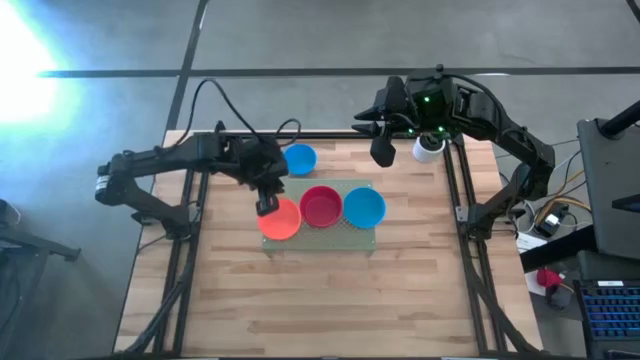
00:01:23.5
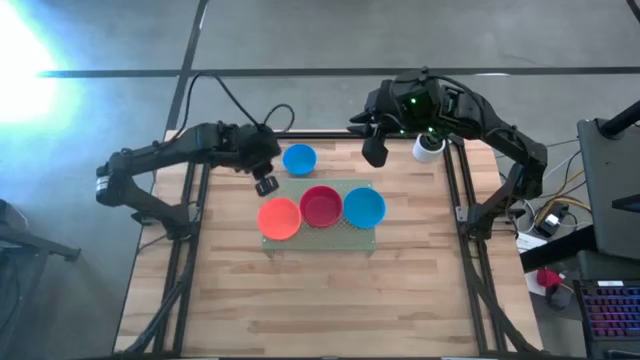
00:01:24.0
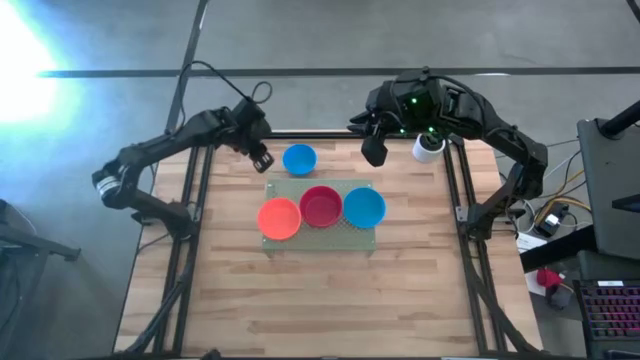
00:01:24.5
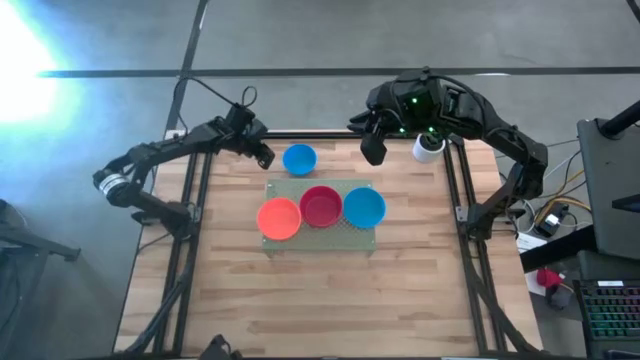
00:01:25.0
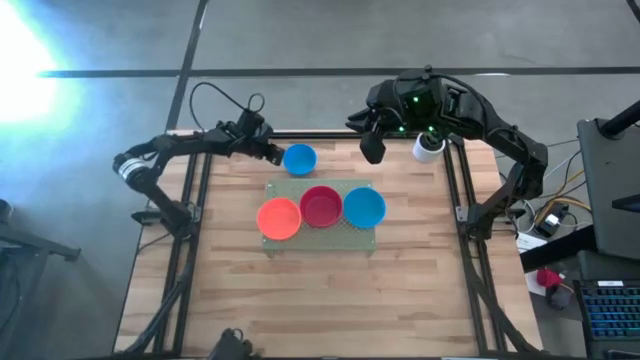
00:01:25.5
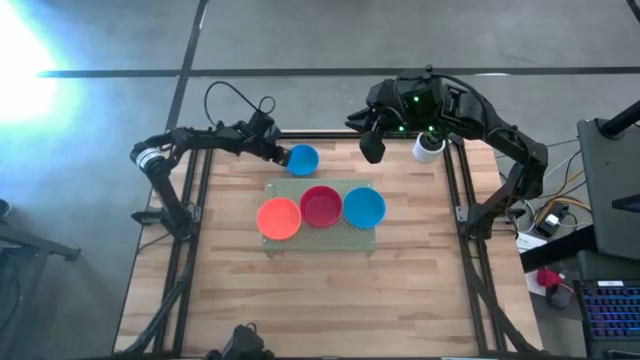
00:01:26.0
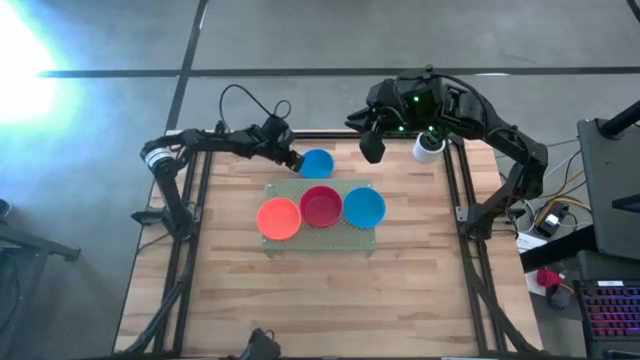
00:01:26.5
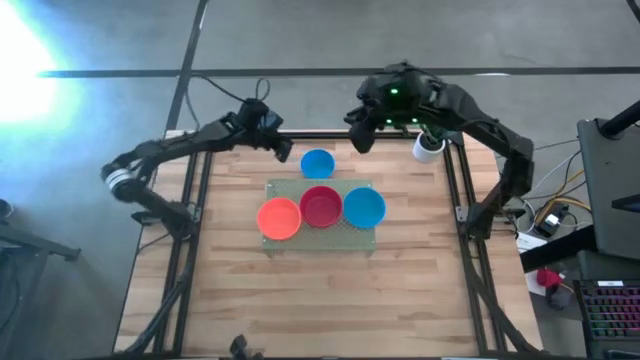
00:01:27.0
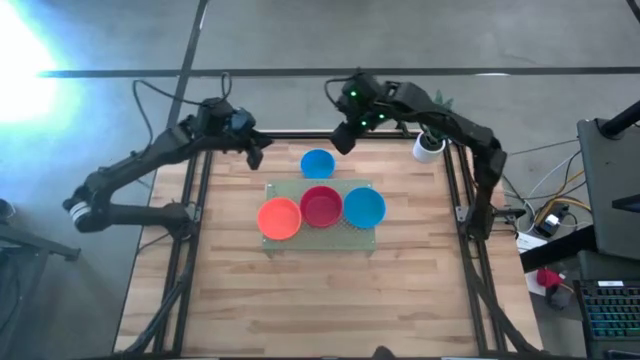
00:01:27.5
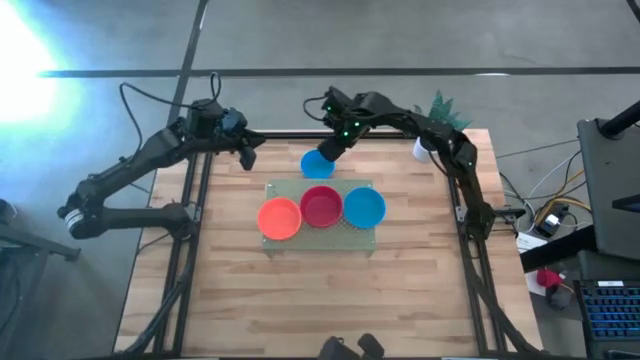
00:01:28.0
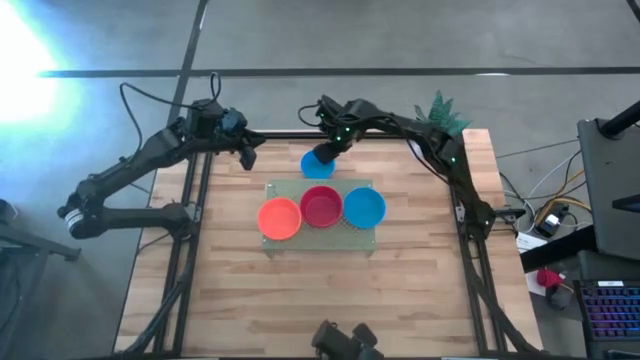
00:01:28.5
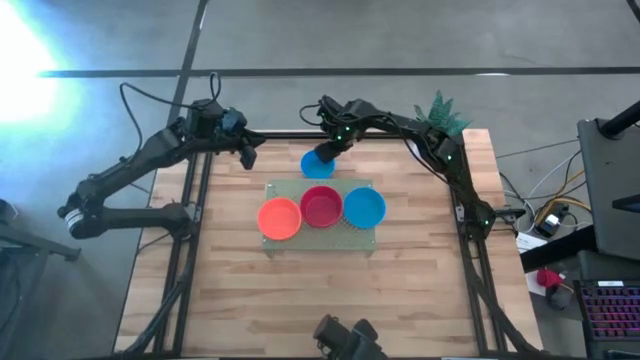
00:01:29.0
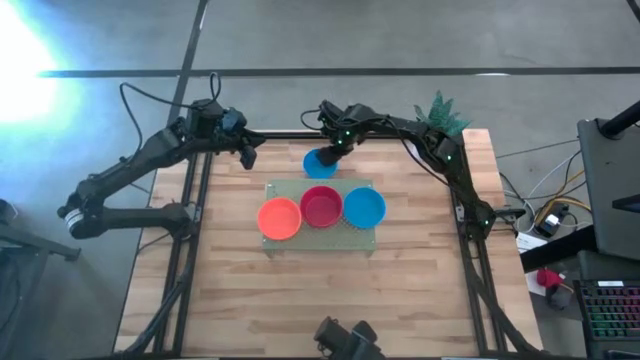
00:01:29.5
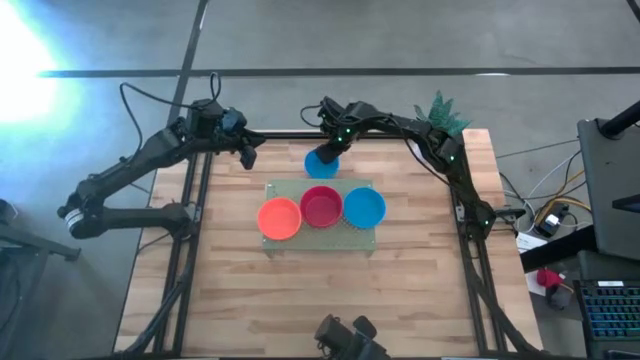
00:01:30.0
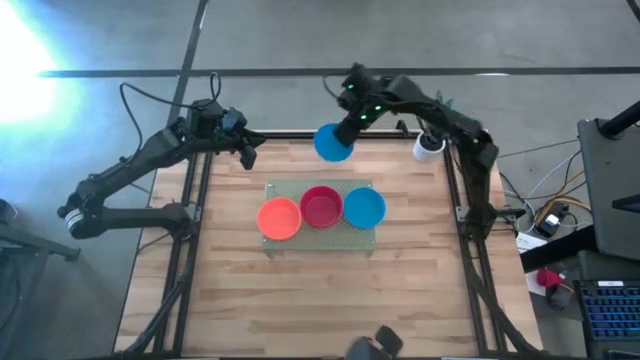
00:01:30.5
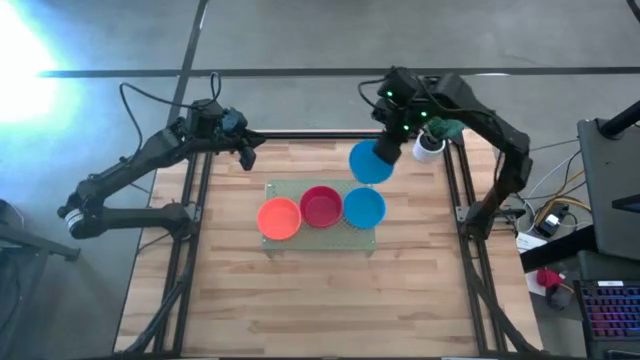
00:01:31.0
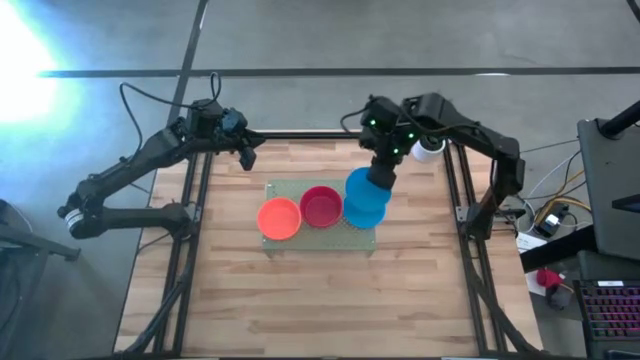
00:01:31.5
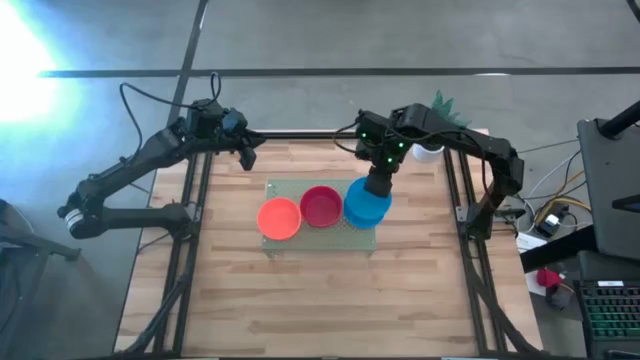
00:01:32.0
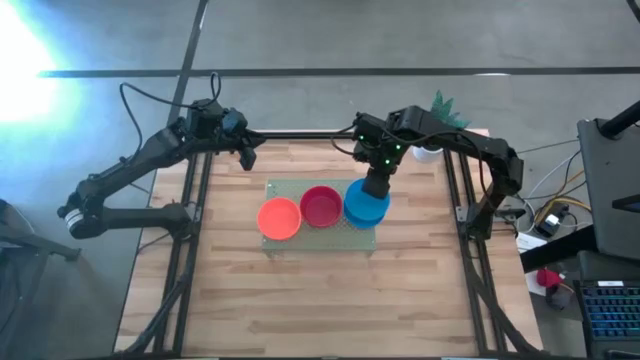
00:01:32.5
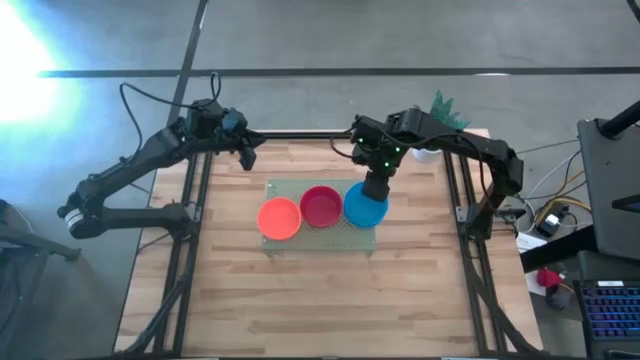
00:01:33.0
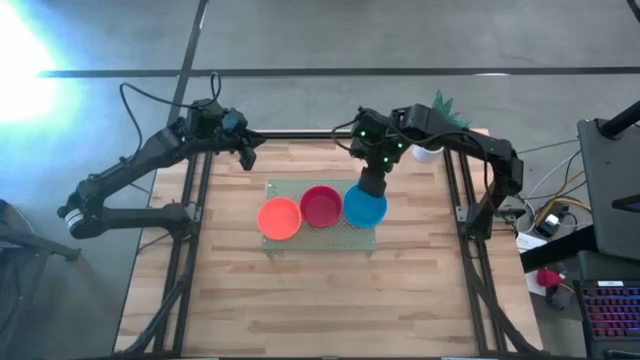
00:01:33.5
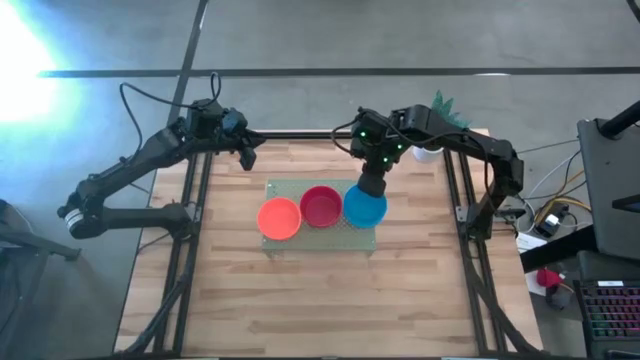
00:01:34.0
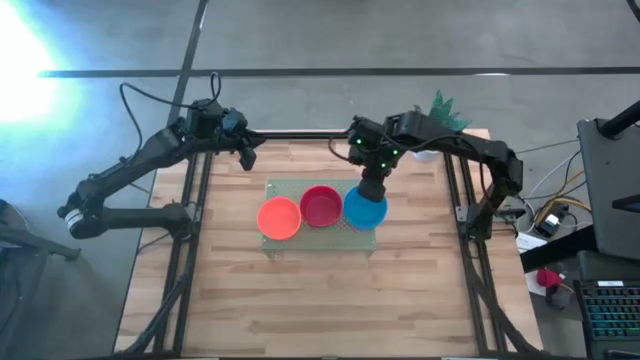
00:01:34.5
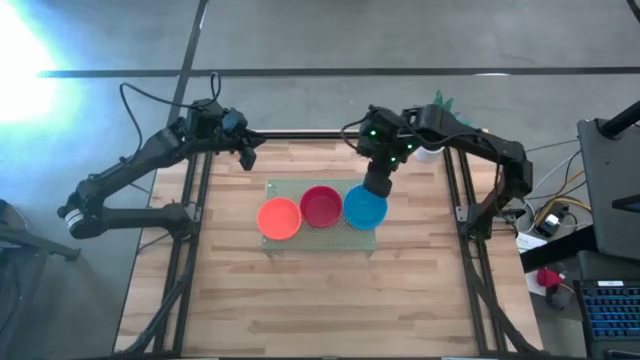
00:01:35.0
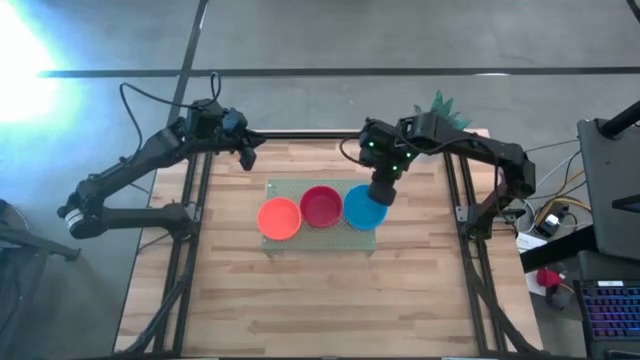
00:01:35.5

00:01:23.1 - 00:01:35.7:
Task: Pick & Place Mini bowls
Stack the blue bowl on top of the other blue bowls on the shelf

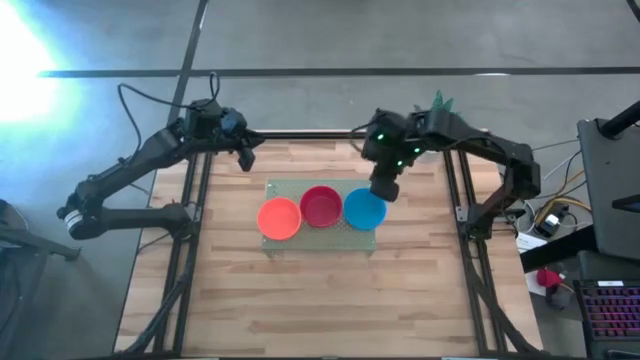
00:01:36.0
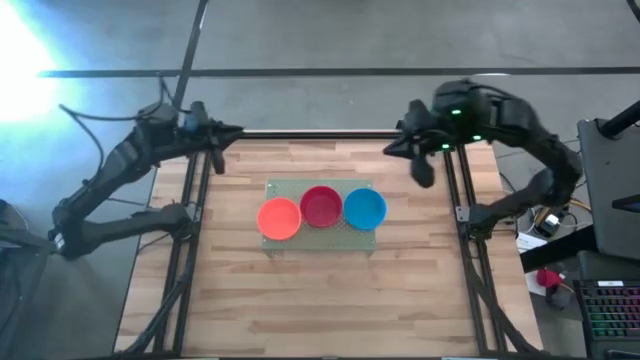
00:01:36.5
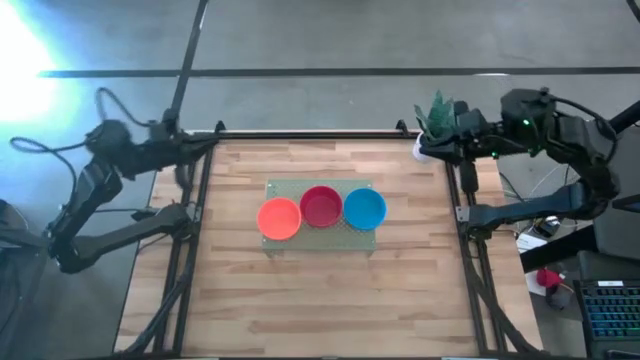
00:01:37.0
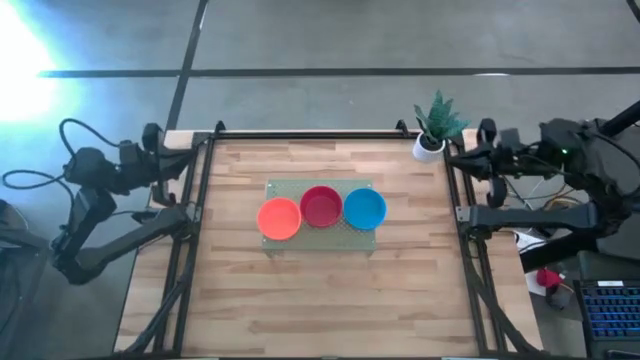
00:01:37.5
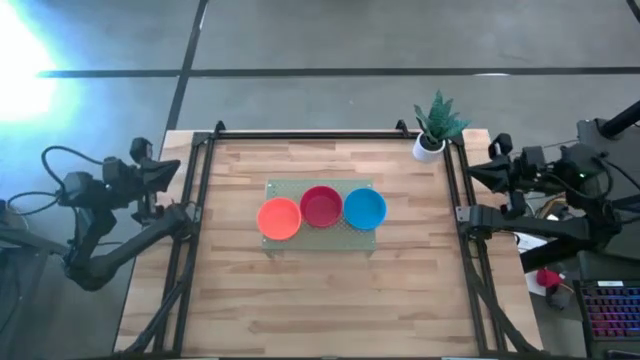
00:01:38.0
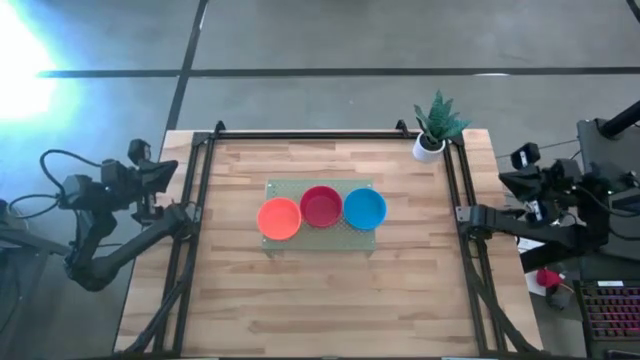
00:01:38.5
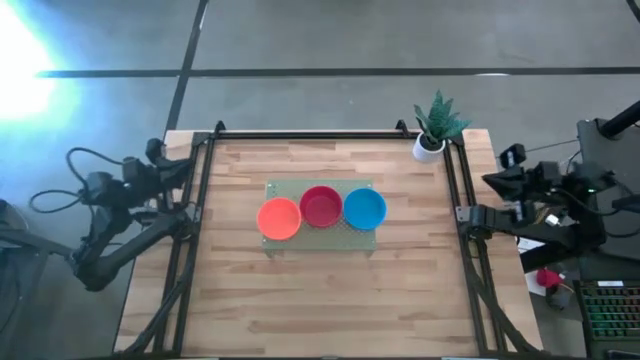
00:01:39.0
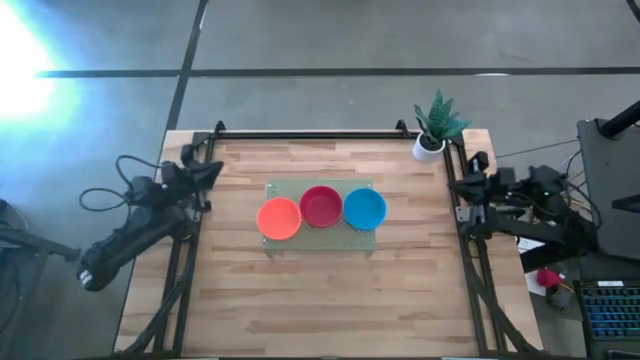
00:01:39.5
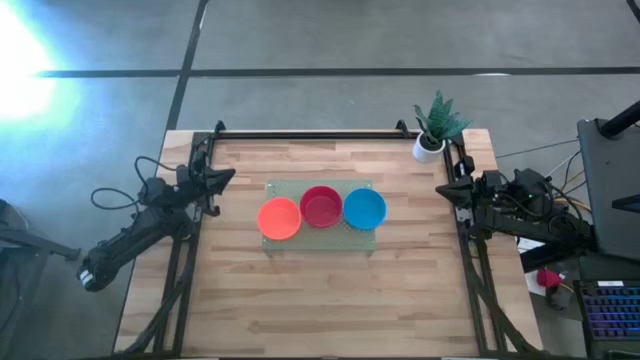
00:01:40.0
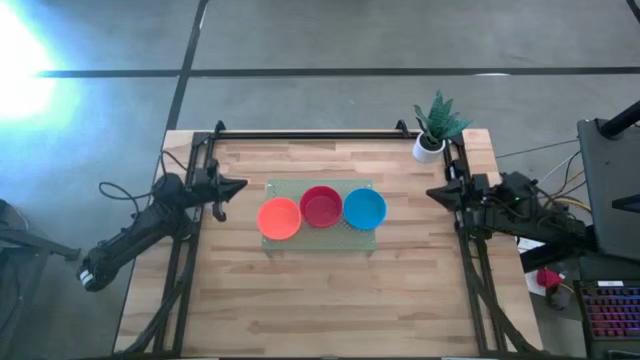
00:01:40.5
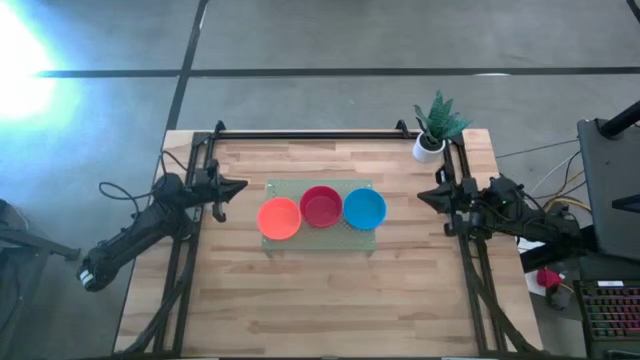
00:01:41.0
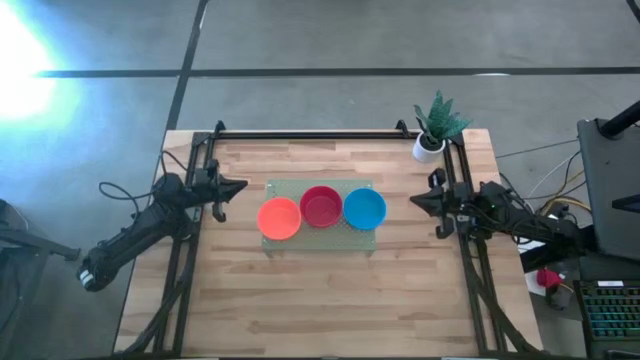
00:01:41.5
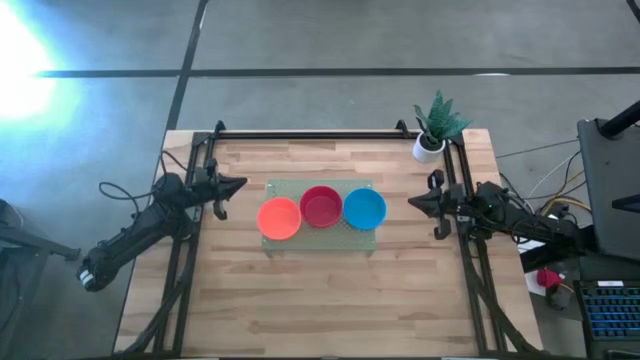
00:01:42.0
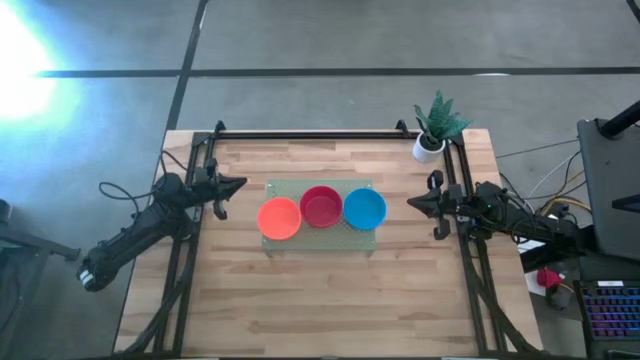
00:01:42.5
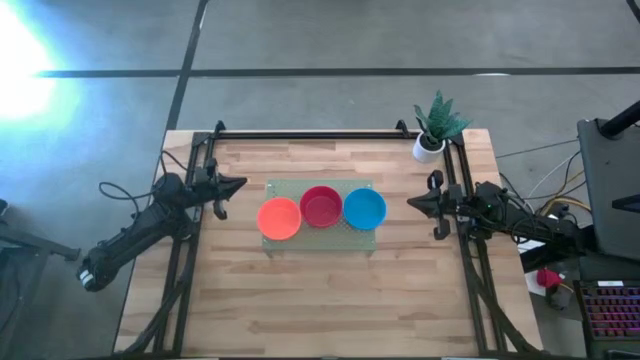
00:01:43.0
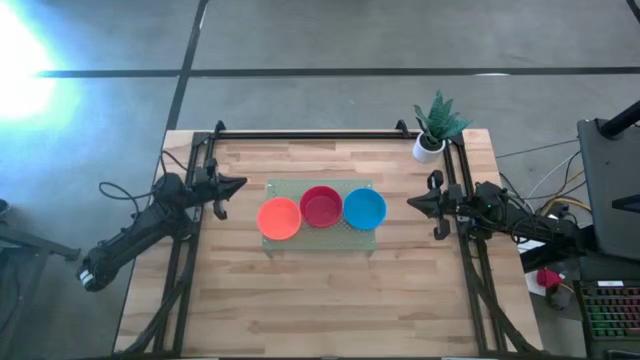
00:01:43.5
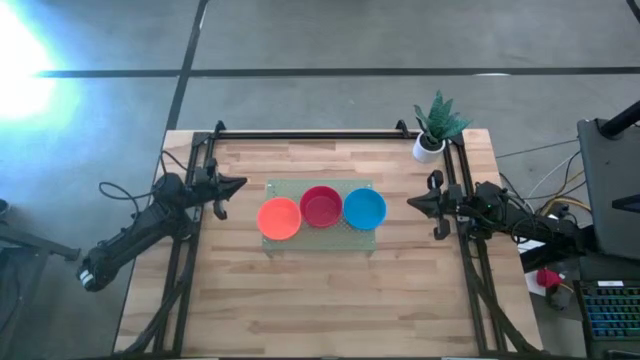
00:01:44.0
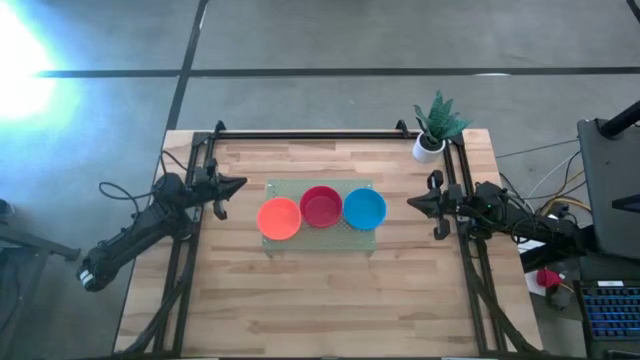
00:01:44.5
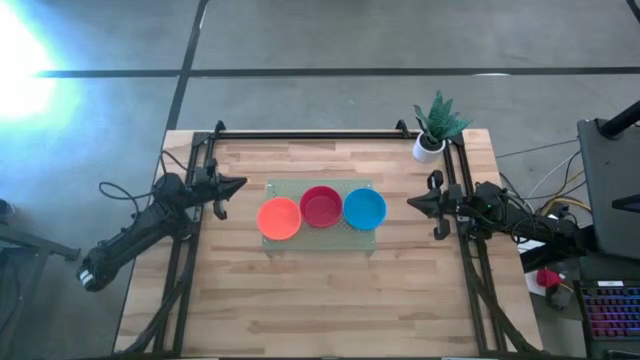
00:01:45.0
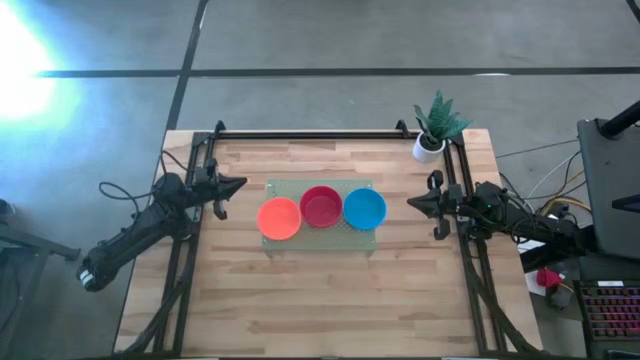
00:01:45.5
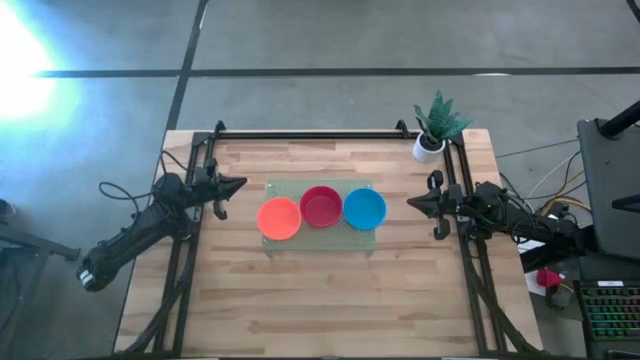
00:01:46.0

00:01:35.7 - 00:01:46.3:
Return to Home Position
